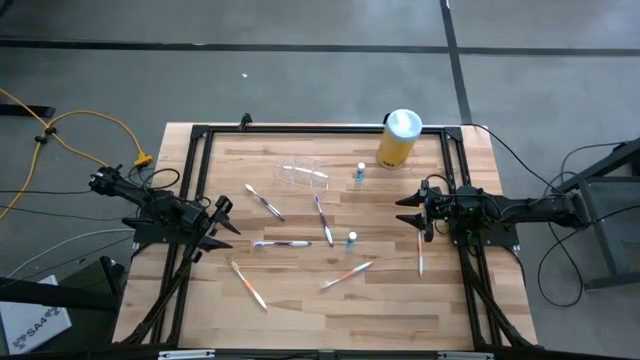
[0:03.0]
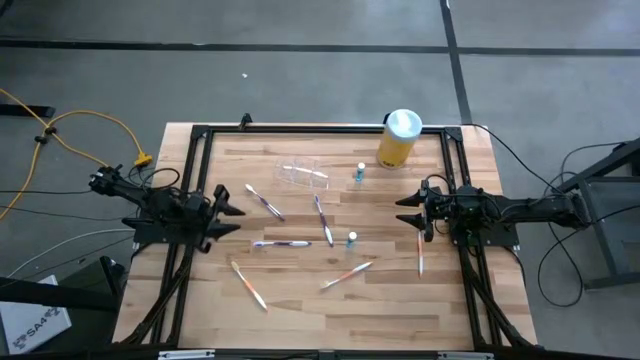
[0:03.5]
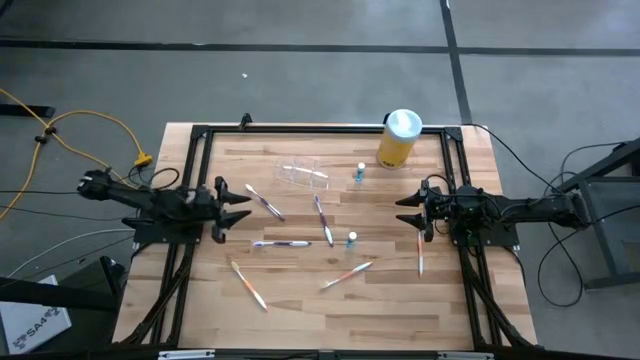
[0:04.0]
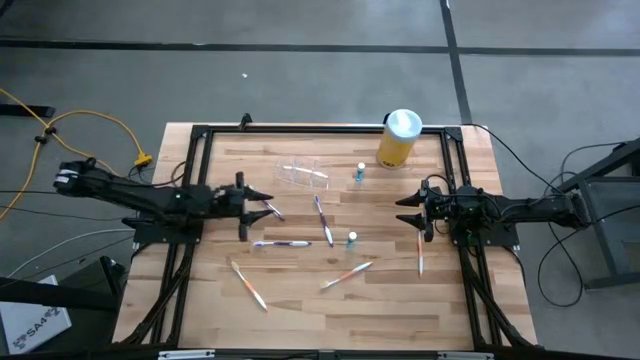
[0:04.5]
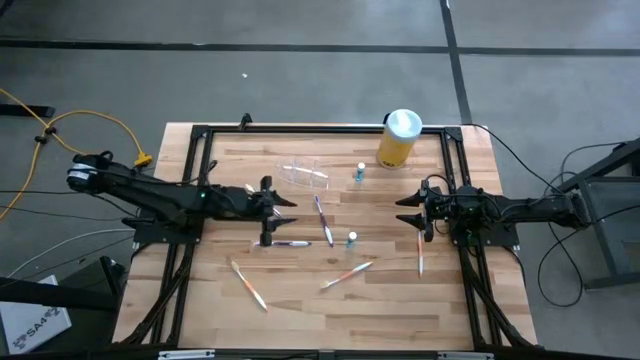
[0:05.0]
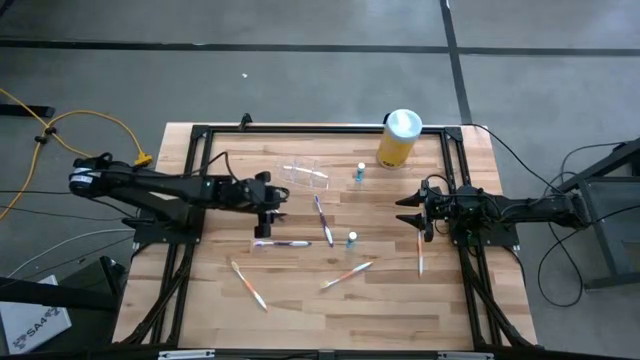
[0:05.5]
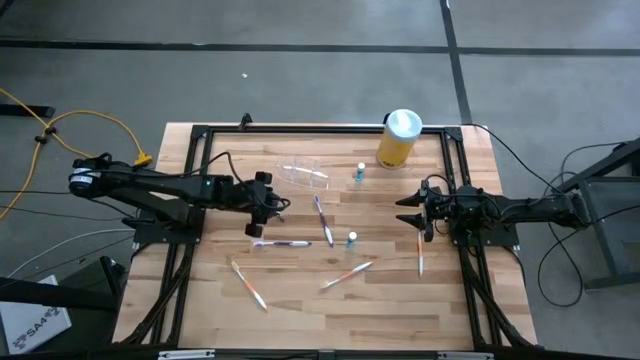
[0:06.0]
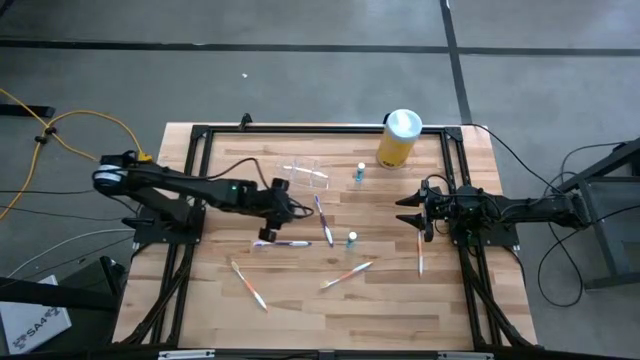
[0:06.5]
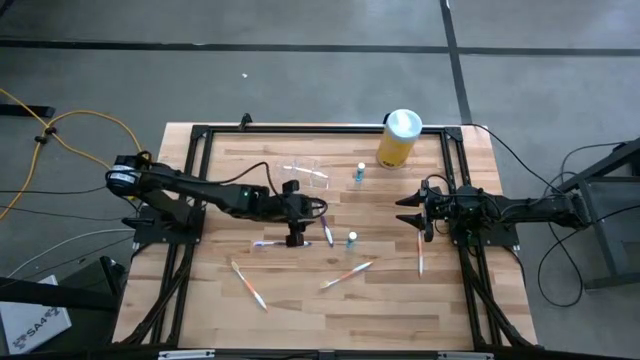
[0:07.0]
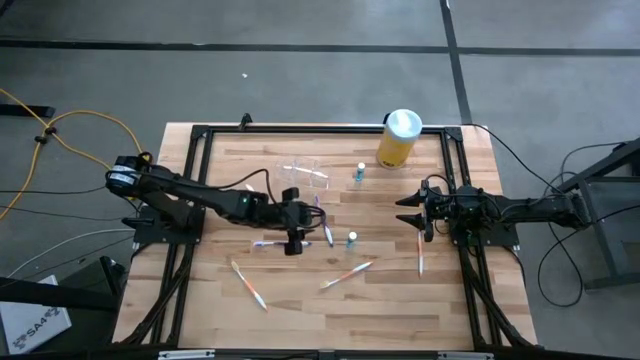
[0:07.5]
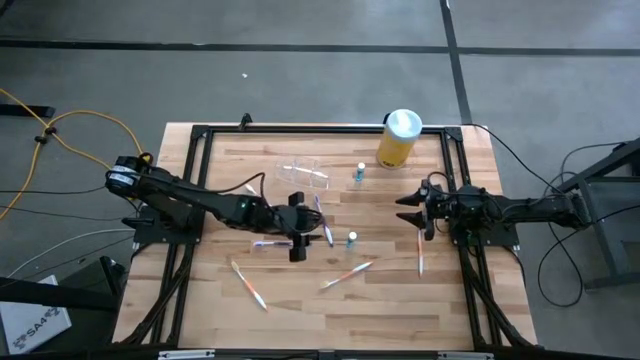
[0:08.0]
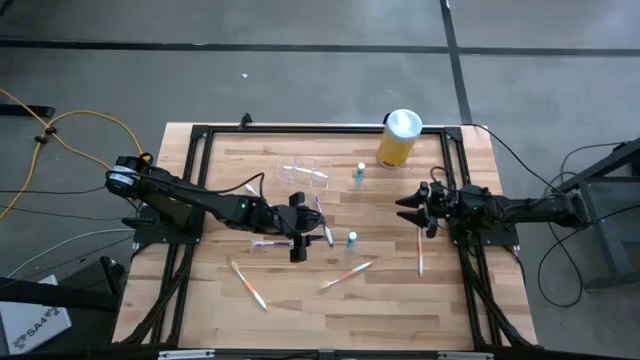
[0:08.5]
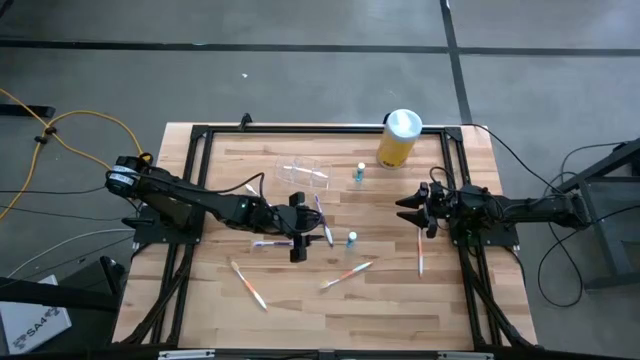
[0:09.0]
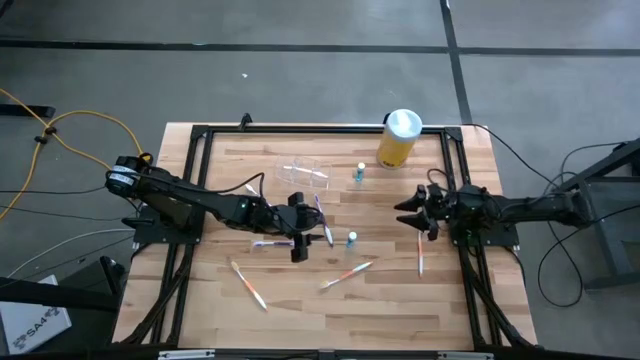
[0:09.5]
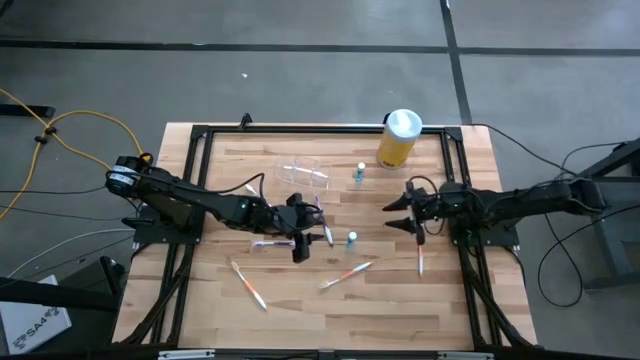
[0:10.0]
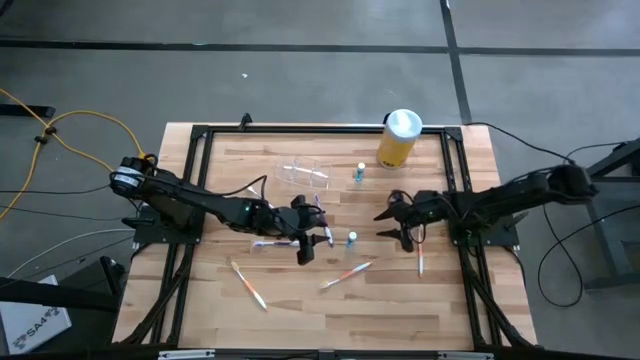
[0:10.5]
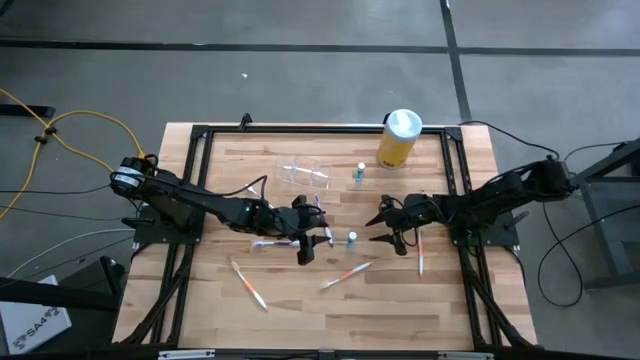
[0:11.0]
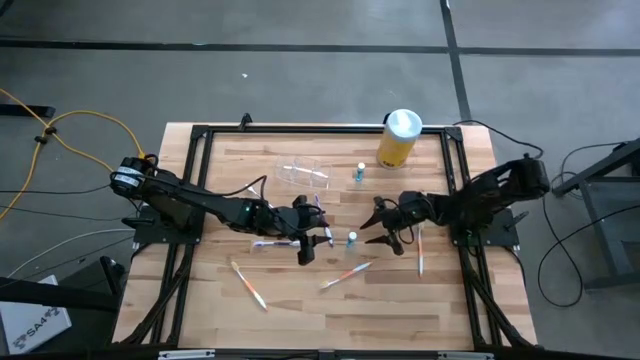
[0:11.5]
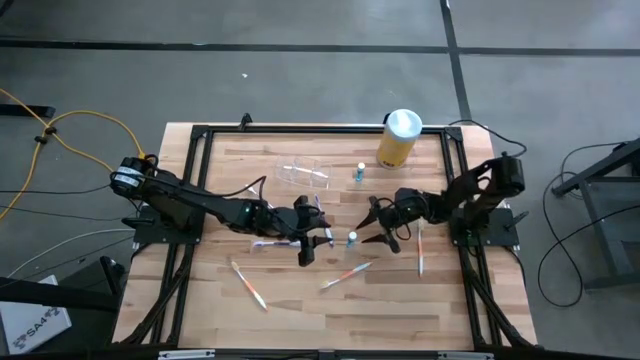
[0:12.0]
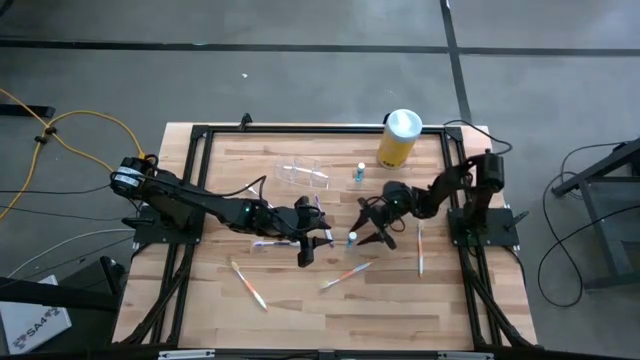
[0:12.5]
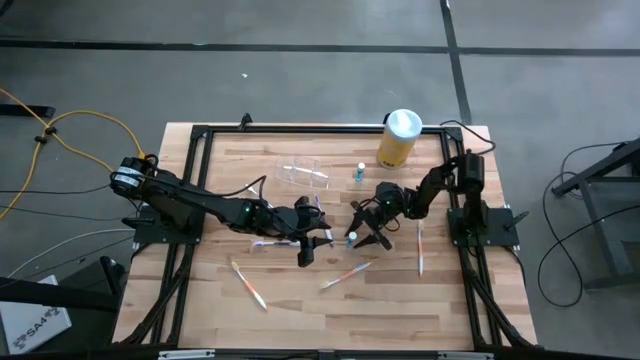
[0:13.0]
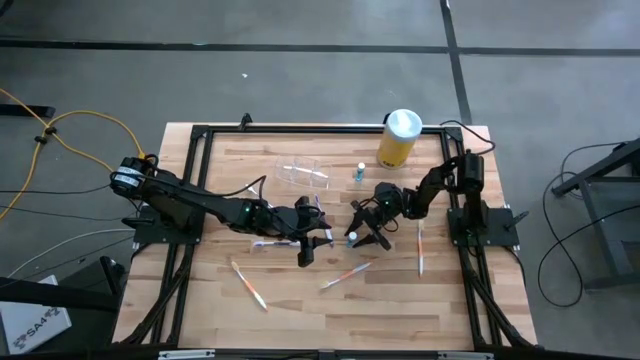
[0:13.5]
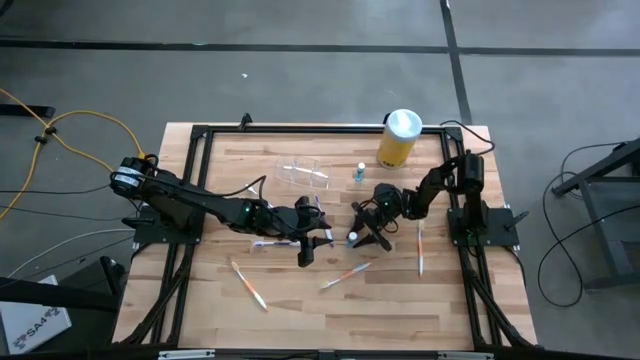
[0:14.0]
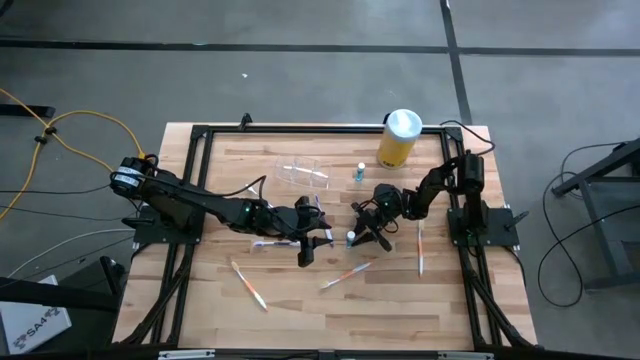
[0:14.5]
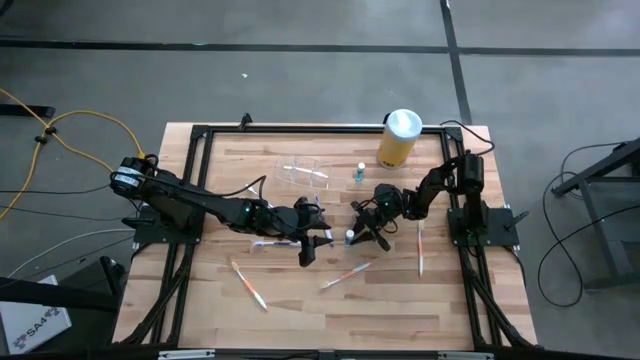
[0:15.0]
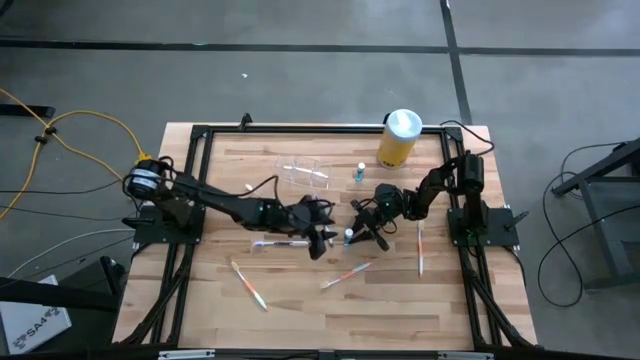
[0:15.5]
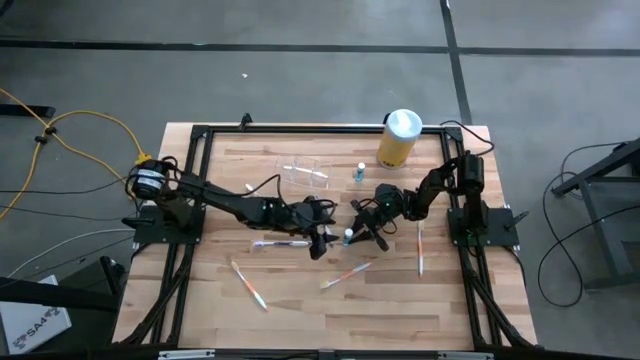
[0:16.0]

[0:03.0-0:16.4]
Task: Pick & Place toothbrushing station
Put the bottom blue mouthwash into the transparent organizer

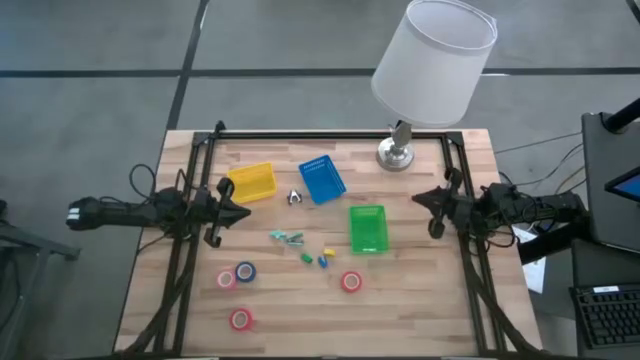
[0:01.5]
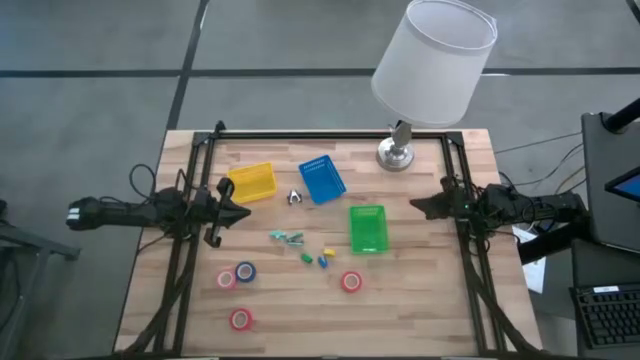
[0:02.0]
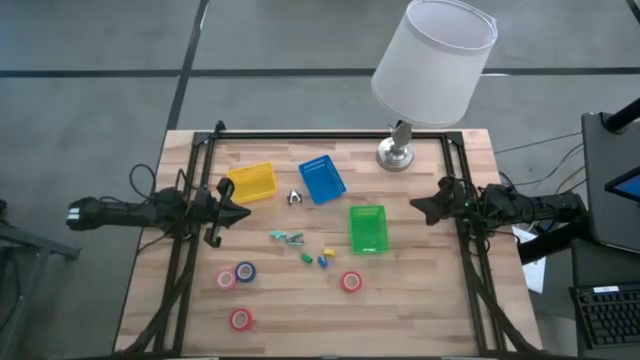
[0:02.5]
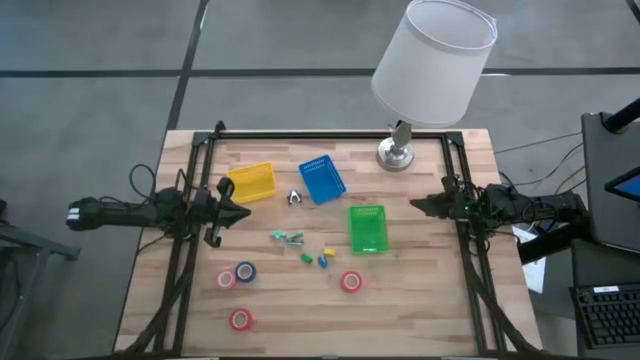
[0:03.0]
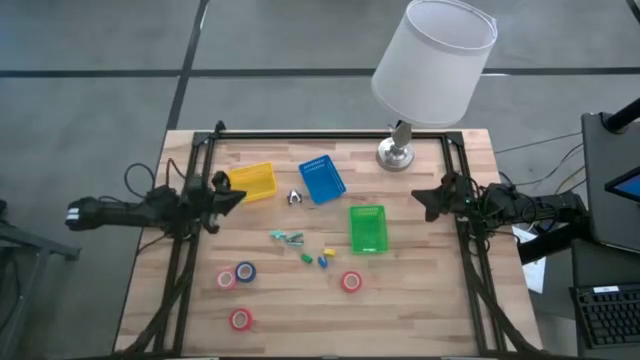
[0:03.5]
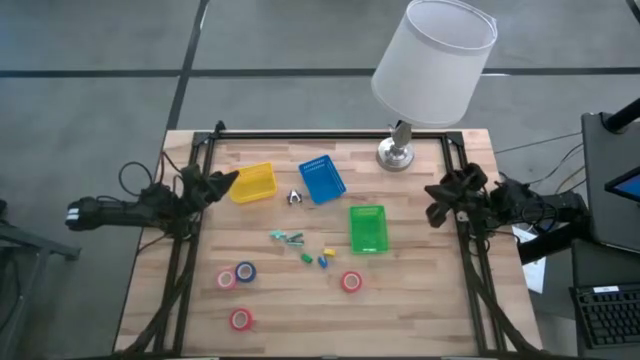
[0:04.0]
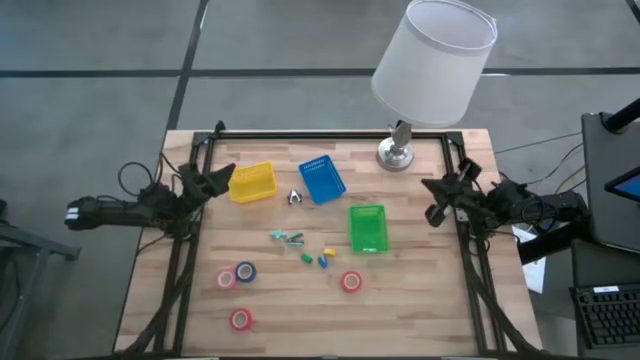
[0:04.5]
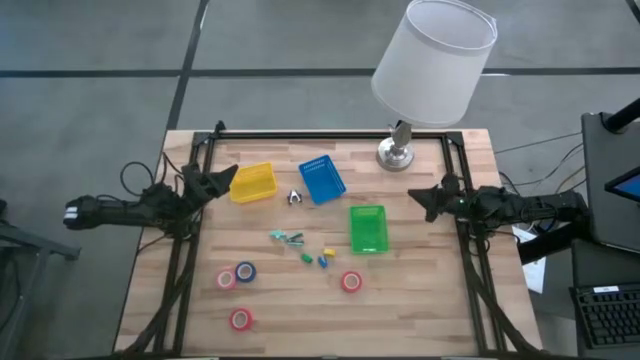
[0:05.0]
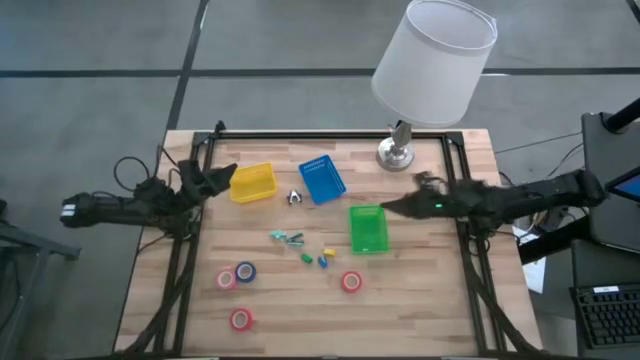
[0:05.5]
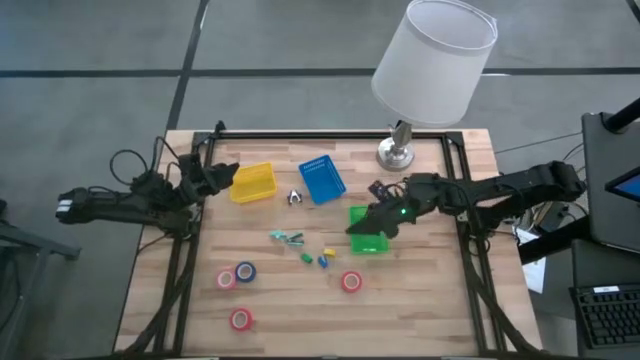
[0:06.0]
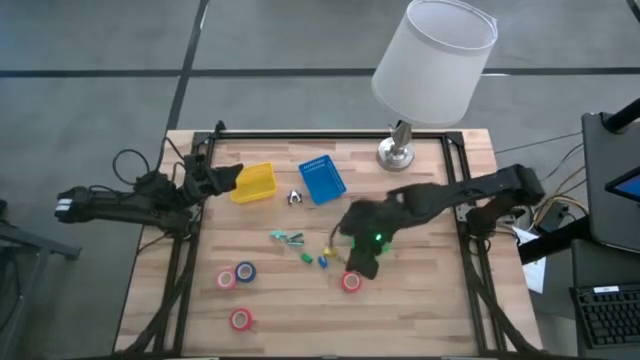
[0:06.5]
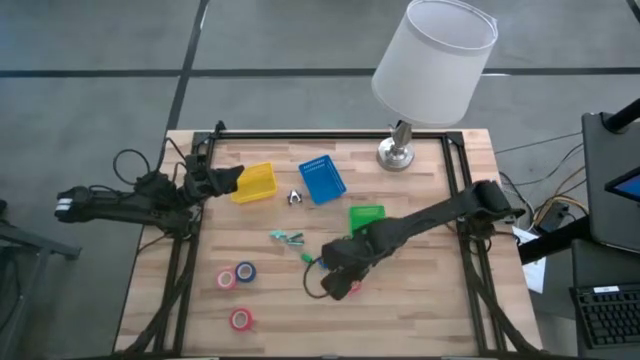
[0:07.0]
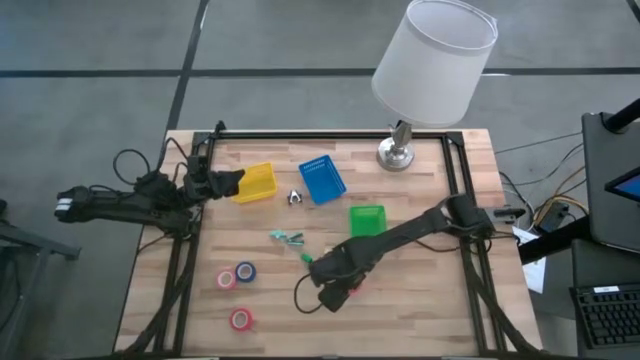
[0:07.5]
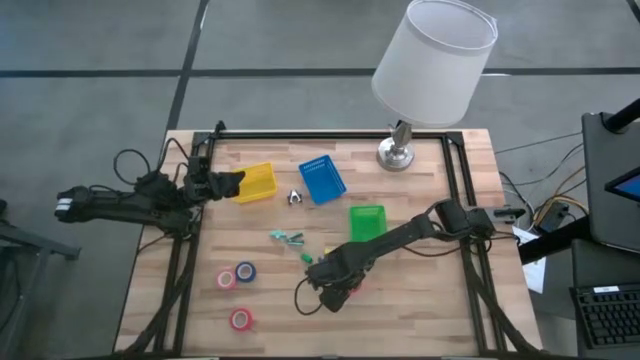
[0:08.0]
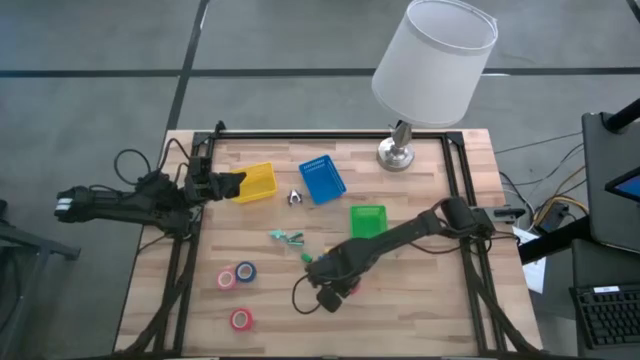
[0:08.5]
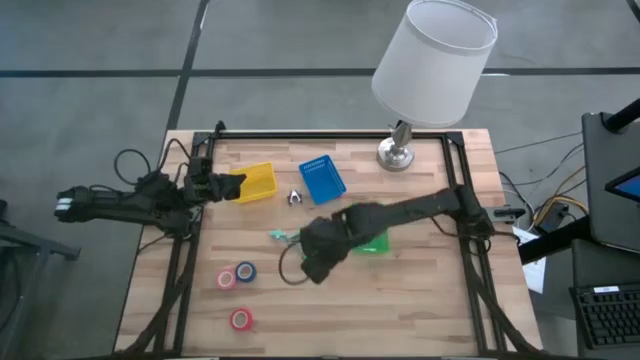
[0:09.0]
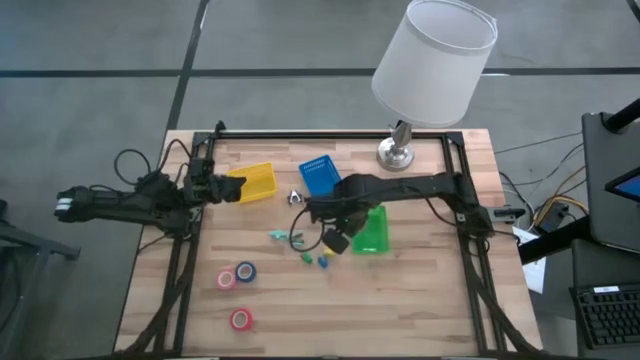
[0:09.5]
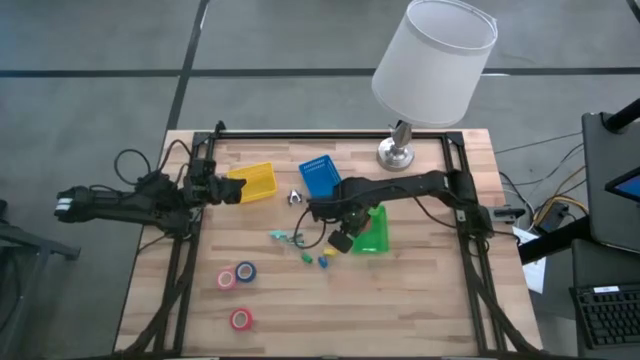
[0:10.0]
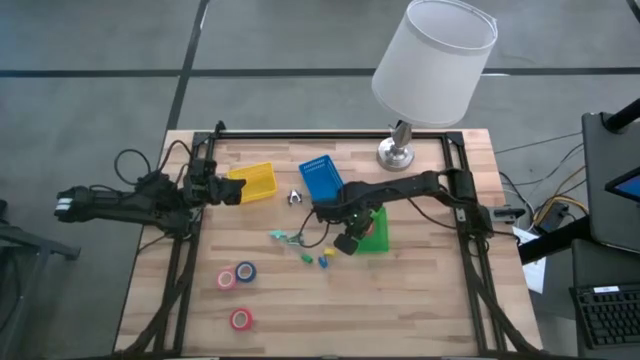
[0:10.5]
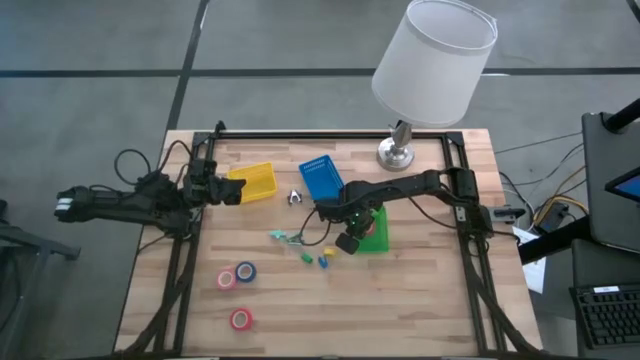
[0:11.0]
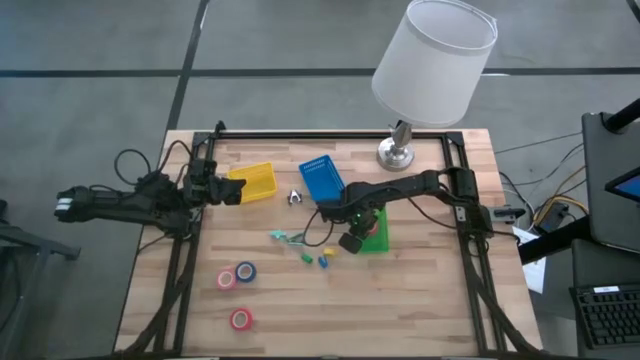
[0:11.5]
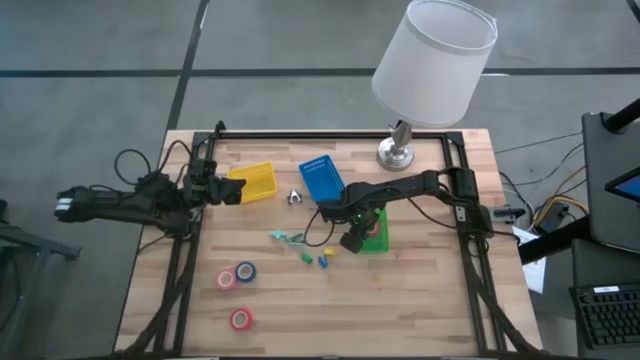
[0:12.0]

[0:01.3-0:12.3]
Task: Pick and place Stapler, Stapler remover, tape
Put the orange tape into the green bin
